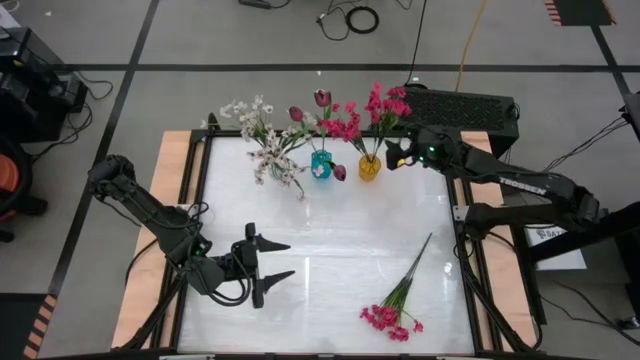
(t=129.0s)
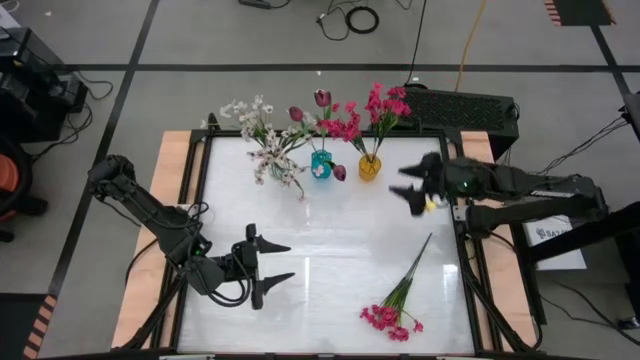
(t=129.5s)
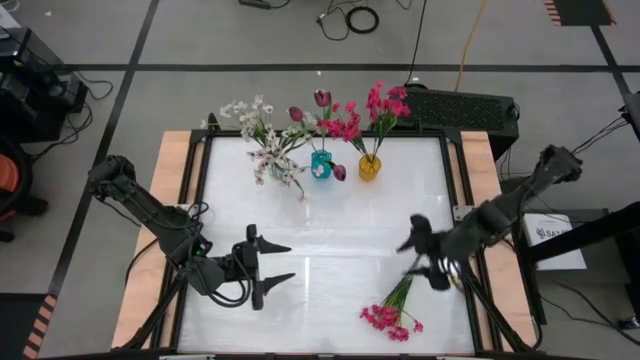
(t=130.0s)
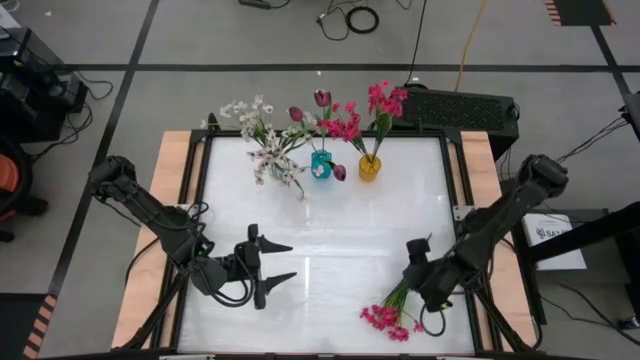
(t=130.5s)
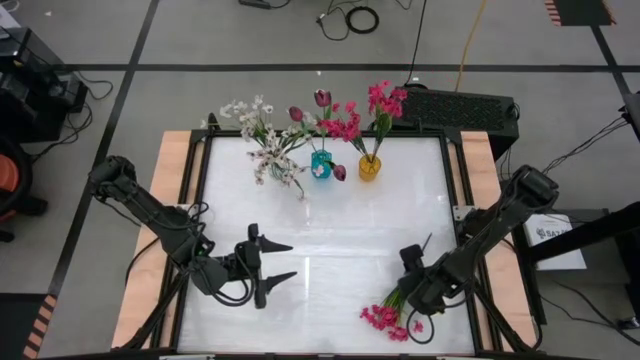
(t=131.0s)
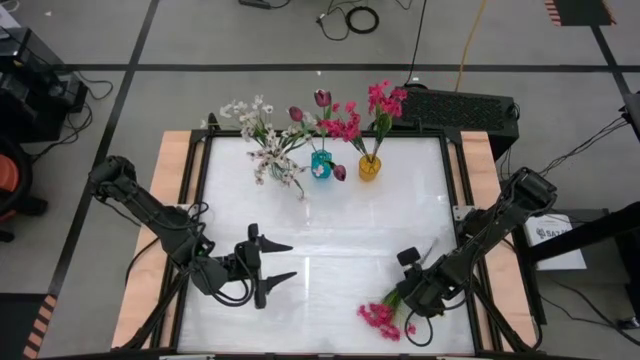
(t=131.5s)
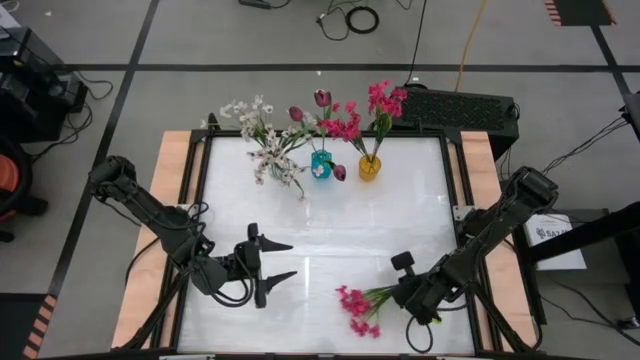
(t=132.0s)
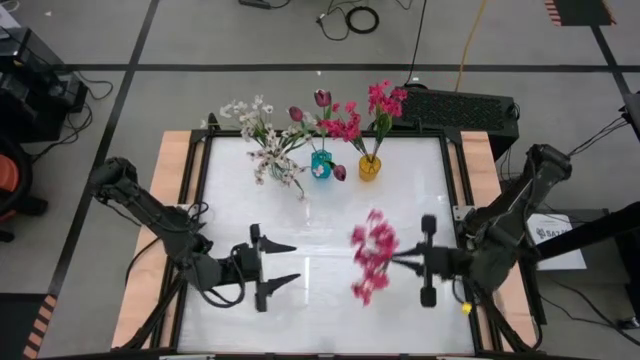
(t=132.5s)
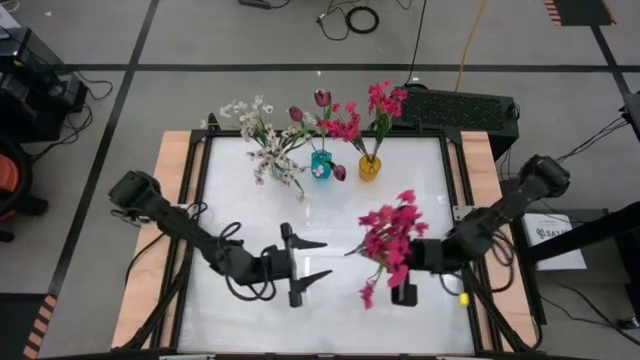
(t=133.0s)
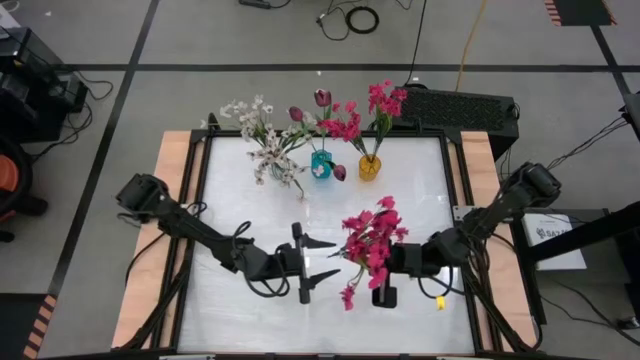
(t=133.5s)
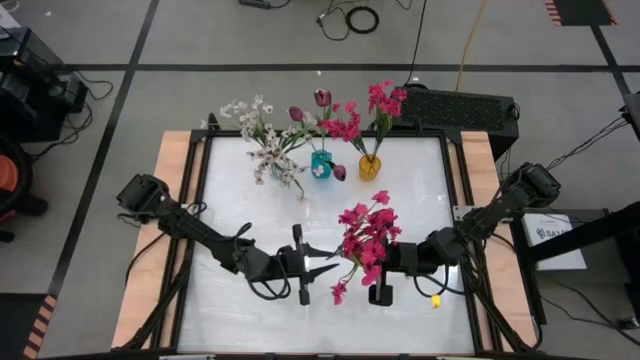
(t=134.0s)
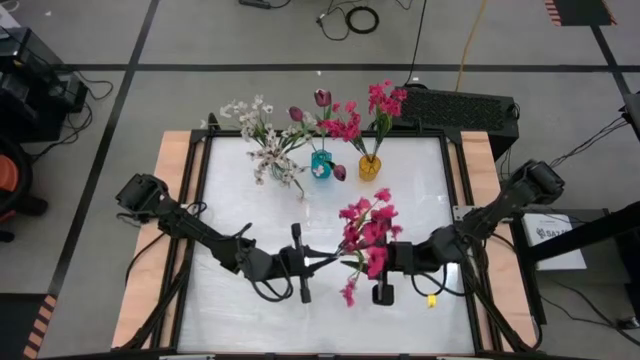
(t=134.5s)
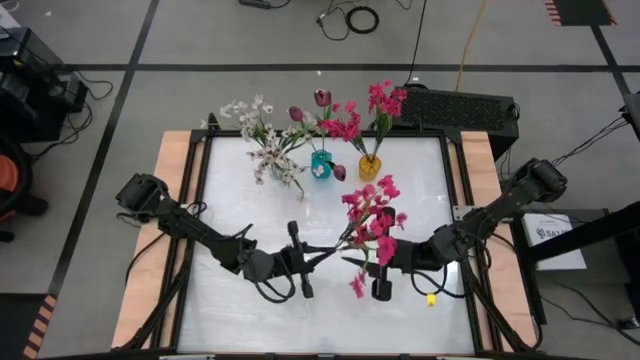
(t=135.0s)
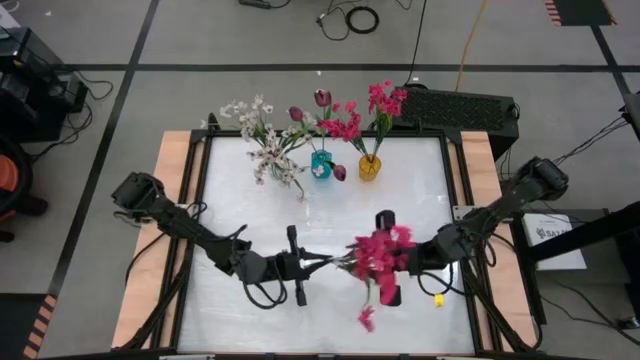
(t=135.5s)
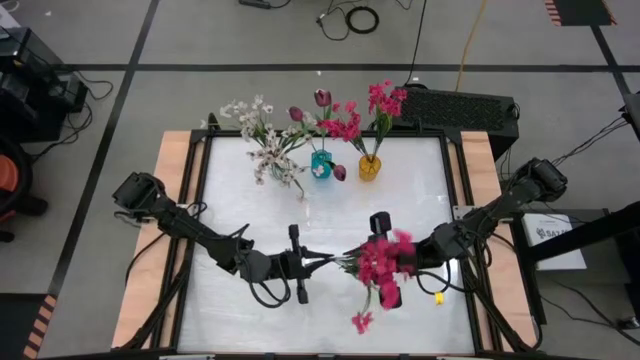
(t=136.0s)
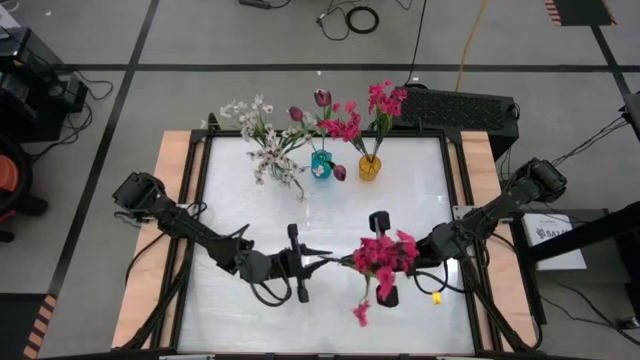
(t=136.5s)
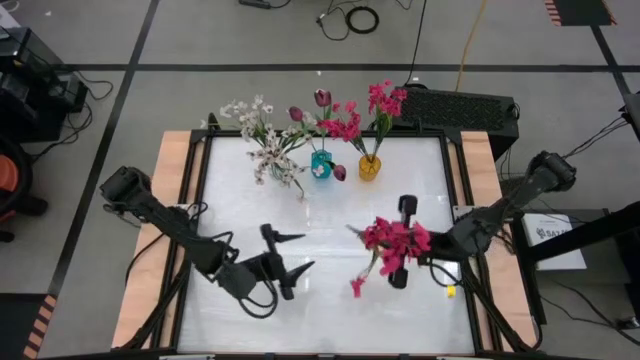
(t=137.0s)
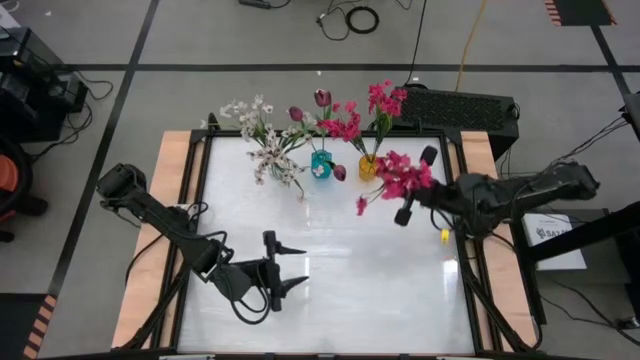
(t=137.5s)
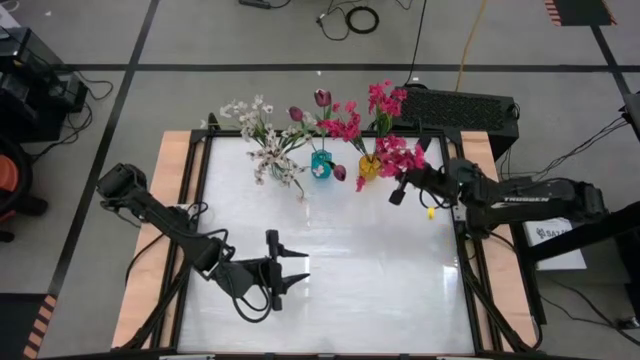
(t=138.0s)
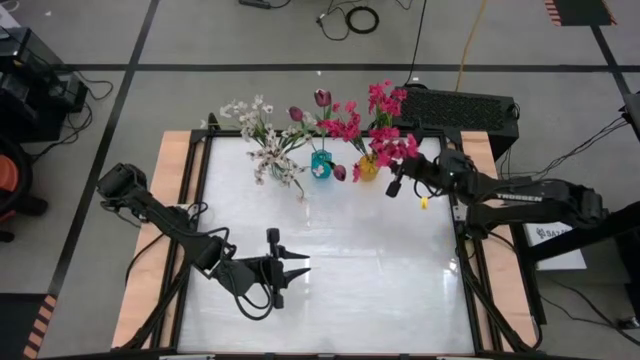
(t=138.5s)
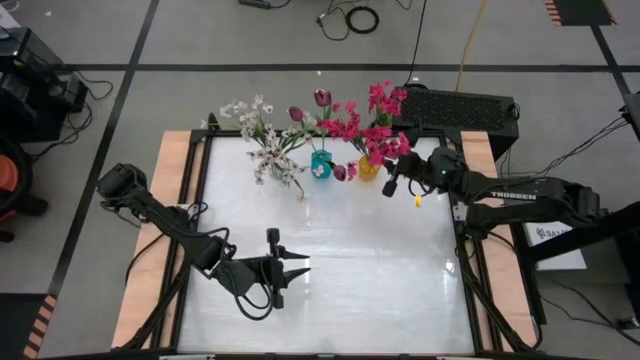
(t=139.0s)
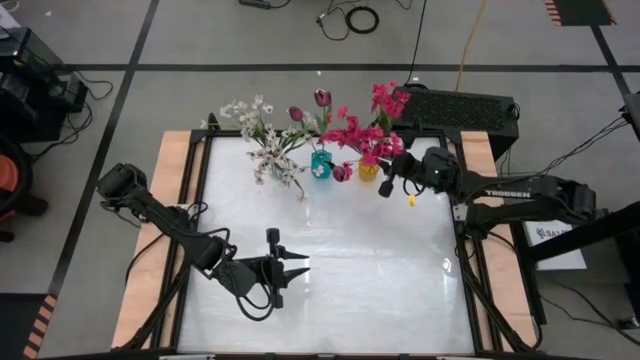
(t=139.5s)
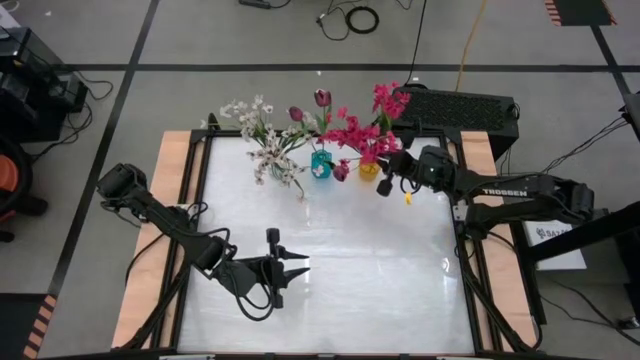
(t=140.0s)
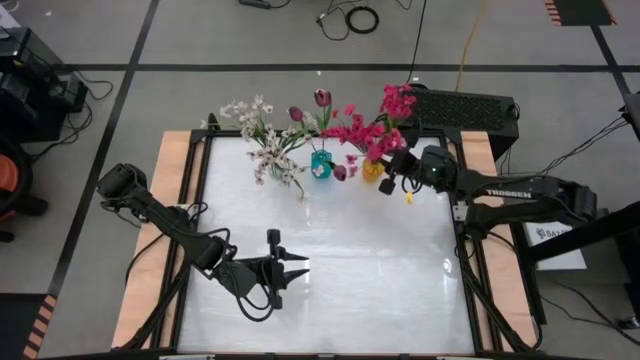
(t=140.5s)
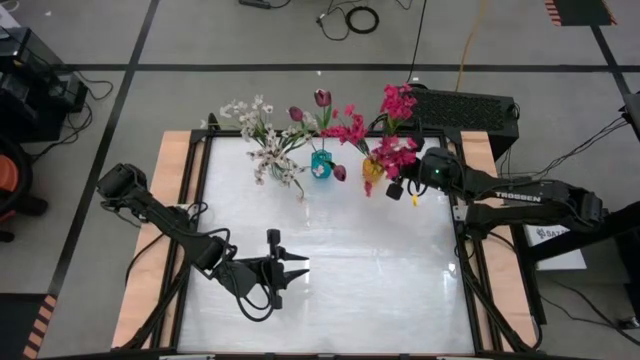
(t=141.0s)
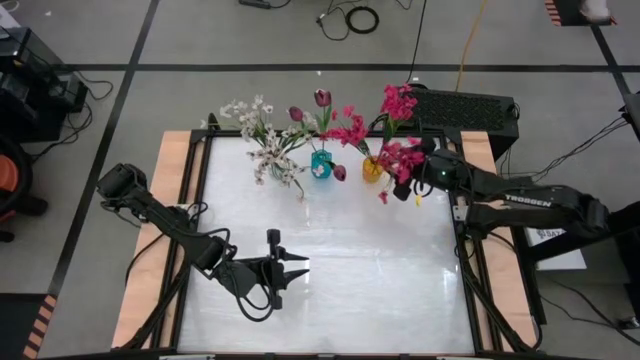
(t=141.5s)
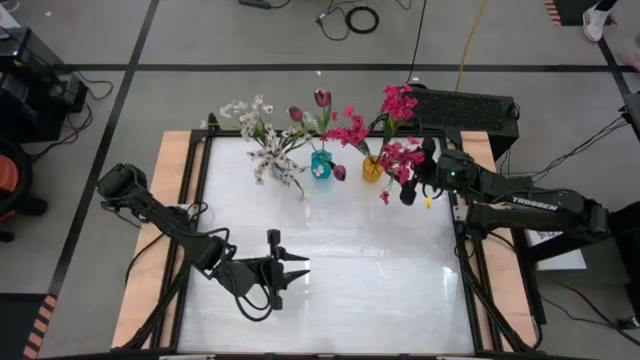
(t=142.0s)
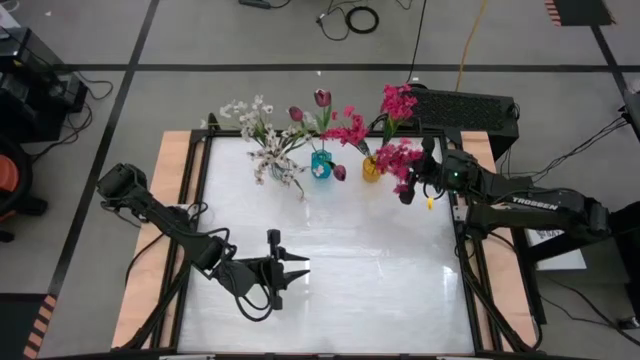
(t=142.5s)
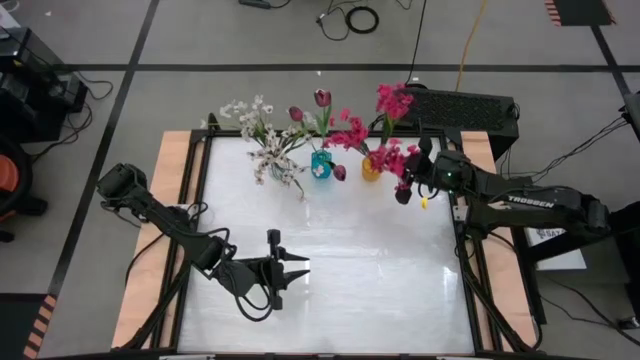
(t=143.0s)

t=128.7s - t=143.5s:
Task: Sort flowers into vase by color
Put the pink flowers into the yellow vase

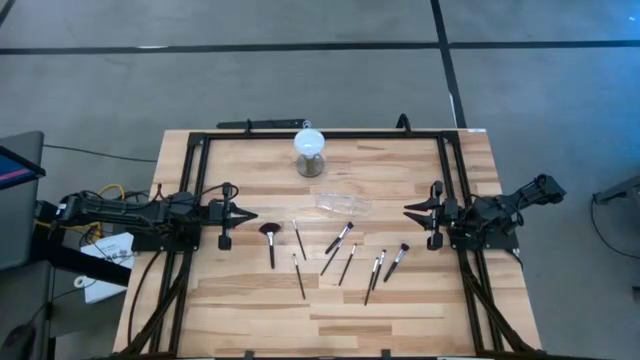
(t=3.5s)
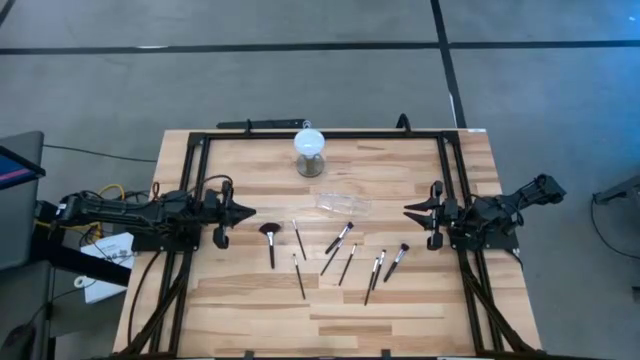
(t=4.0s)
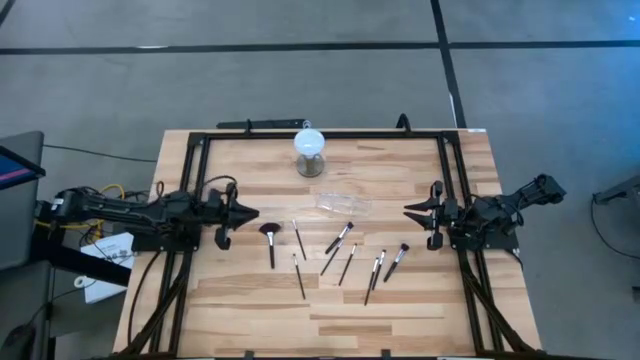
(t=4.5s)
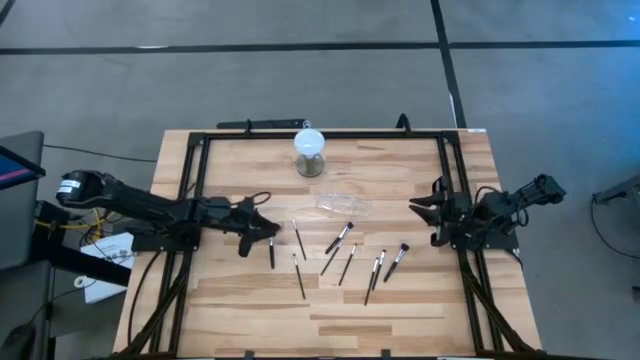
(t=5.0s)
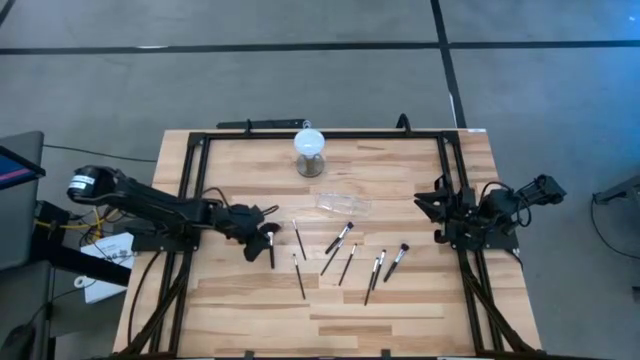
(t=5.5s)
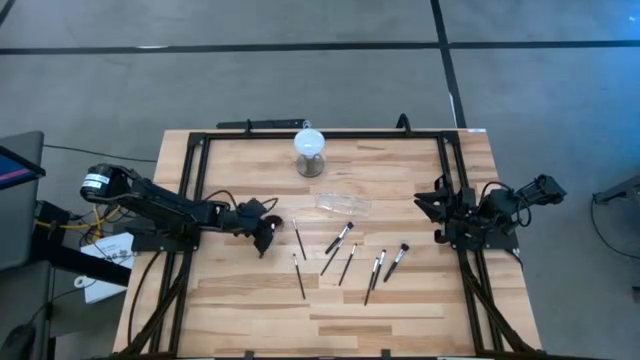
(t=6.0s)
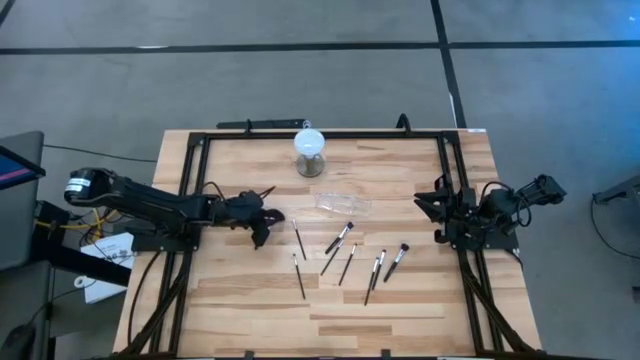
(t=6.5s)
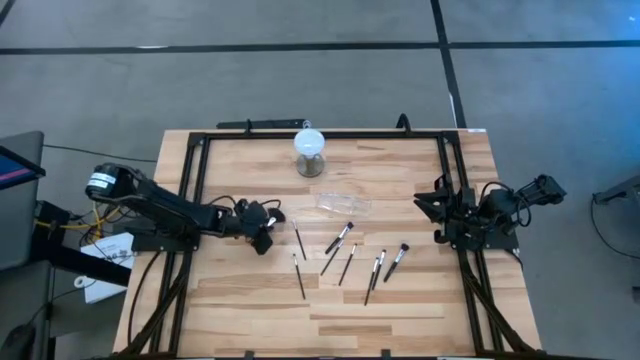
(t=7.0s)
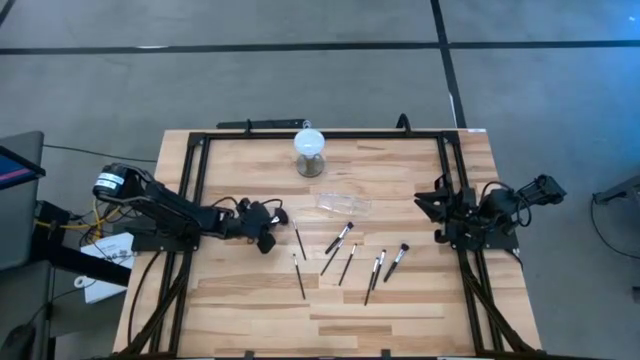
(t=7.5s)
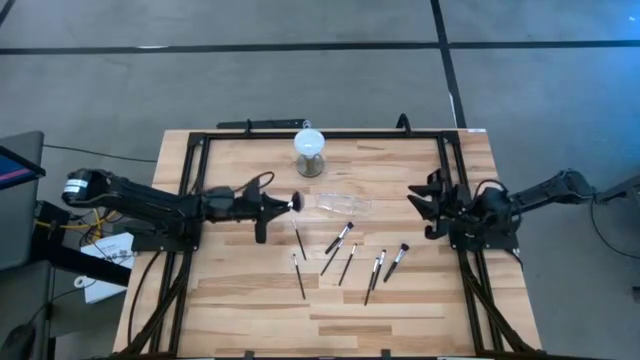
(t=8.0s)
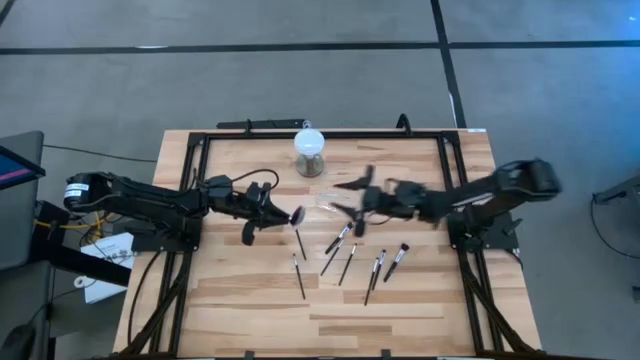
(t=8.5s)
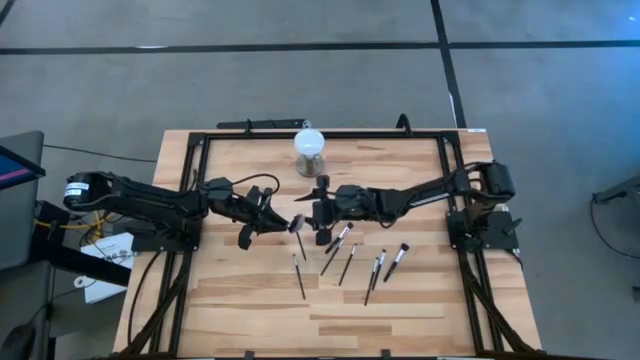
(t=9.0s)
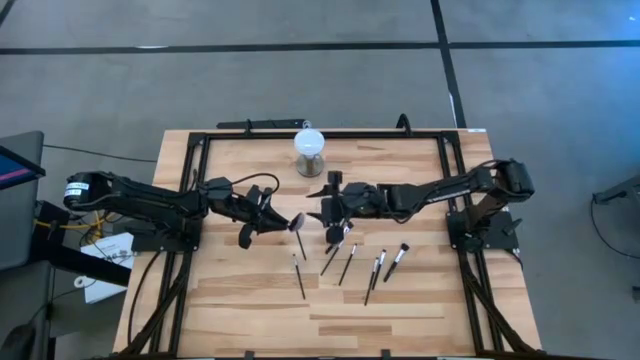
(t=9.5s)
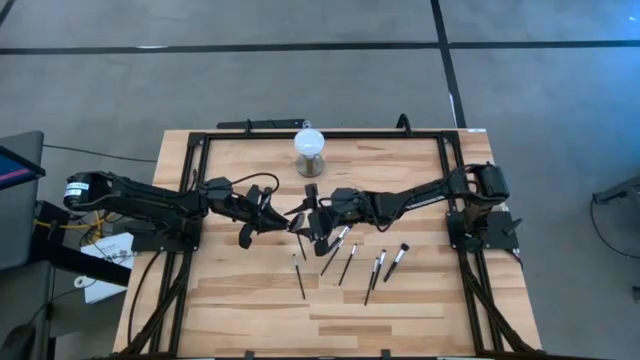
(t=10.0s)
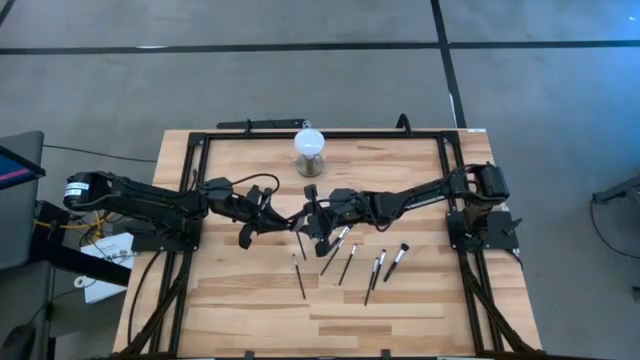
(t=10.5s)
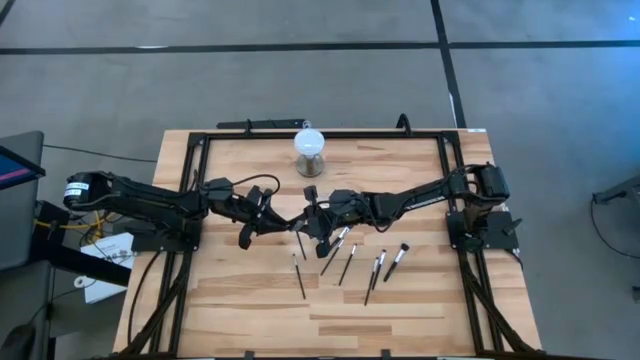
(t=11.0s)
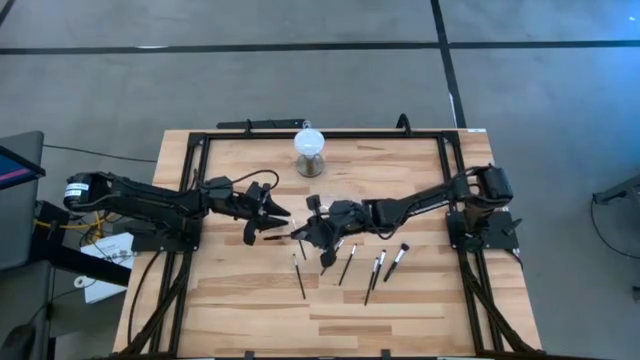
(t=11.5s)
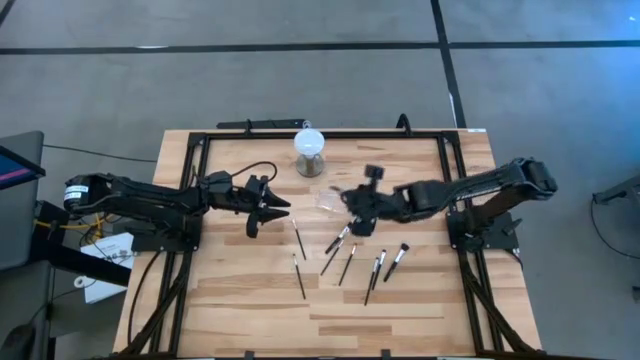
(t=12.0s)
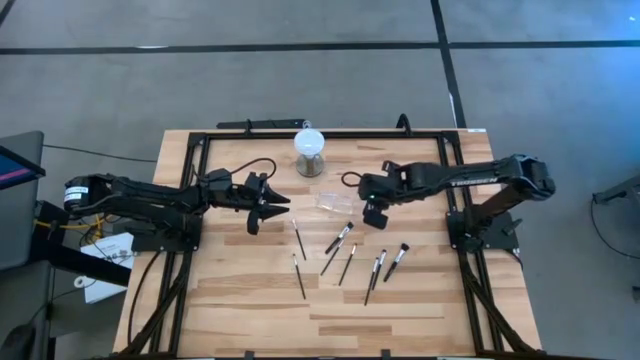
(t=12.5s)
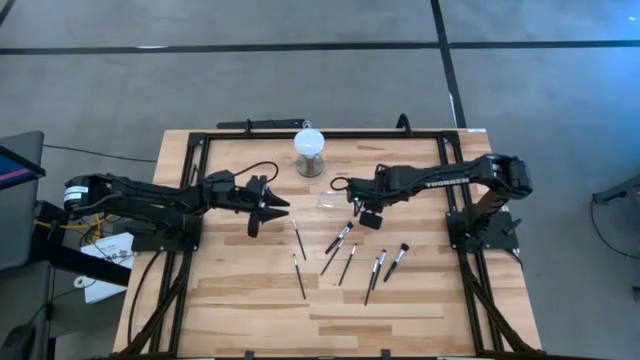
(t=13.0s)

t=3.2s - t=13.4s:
Task: Put items in baskets/containers
Put the black highlighter brush into the transparent organizer
